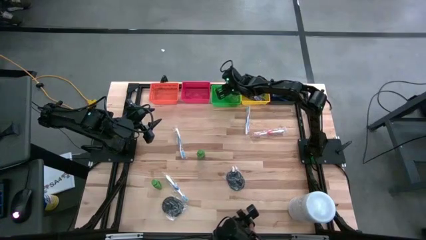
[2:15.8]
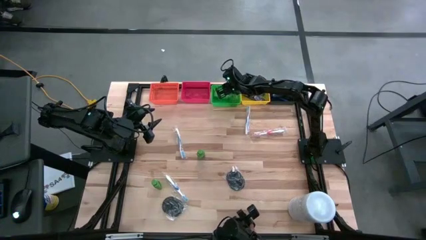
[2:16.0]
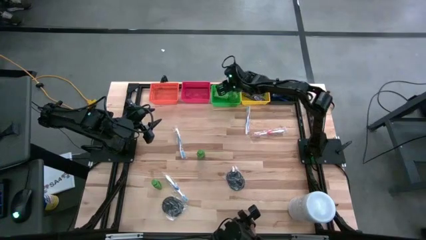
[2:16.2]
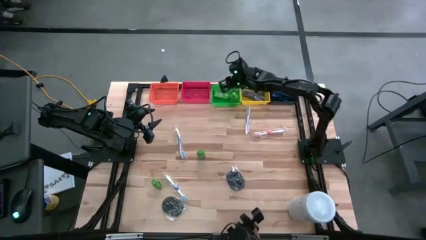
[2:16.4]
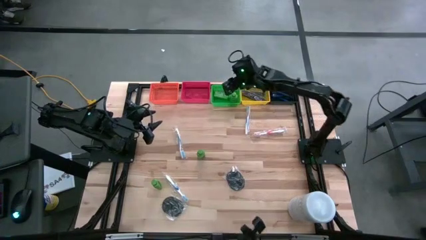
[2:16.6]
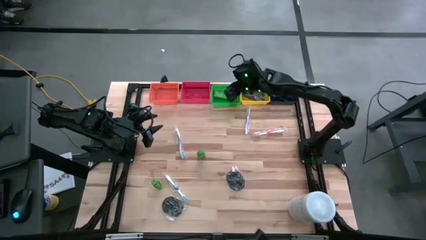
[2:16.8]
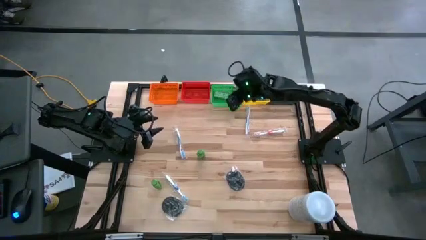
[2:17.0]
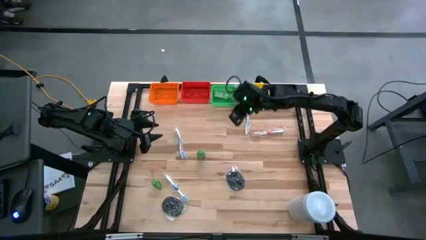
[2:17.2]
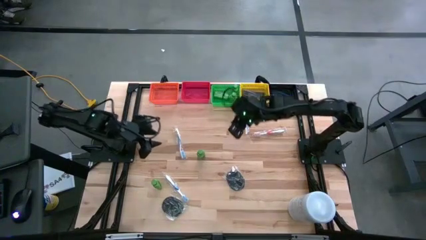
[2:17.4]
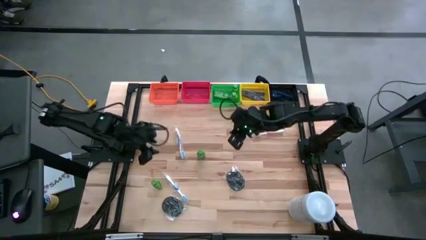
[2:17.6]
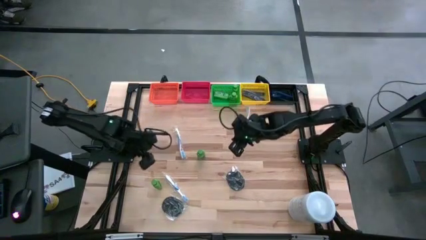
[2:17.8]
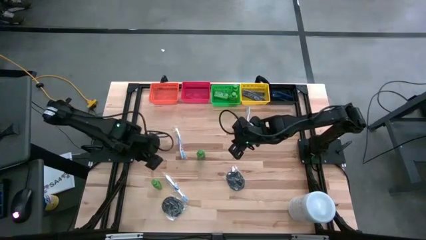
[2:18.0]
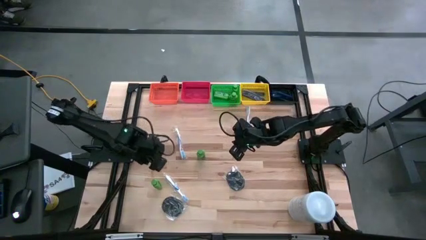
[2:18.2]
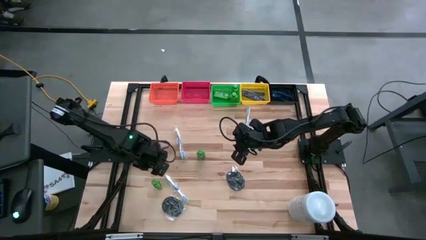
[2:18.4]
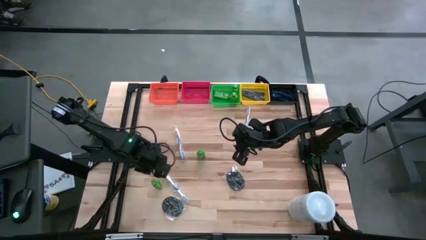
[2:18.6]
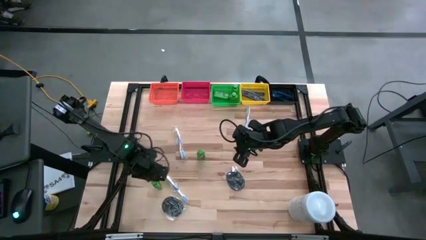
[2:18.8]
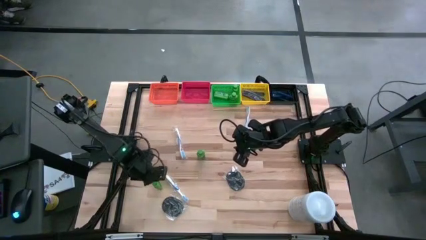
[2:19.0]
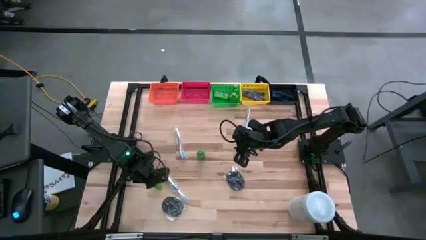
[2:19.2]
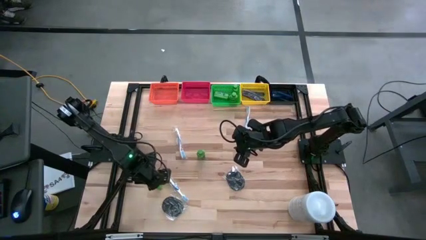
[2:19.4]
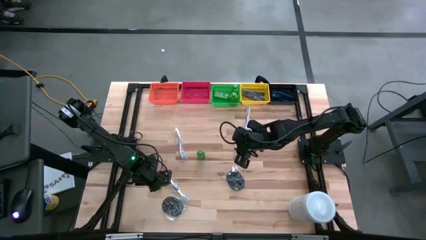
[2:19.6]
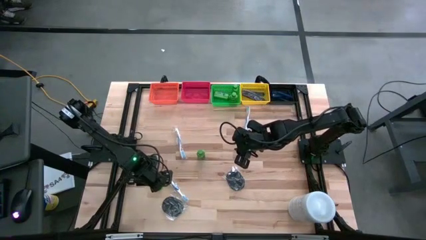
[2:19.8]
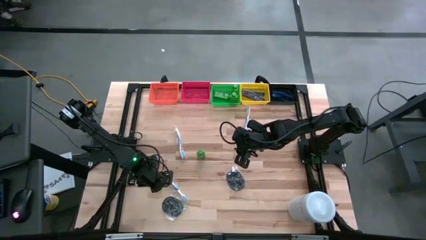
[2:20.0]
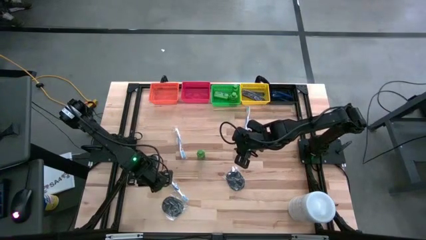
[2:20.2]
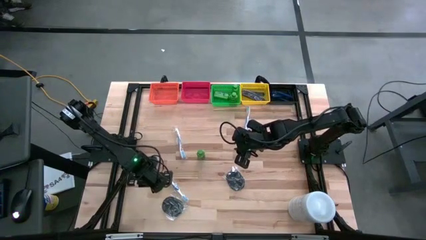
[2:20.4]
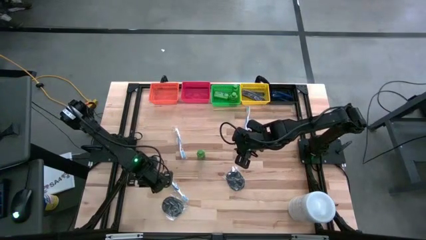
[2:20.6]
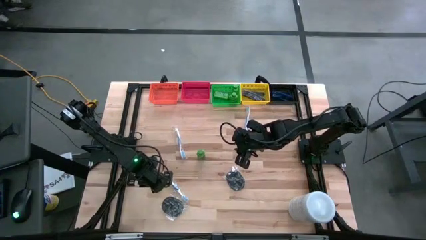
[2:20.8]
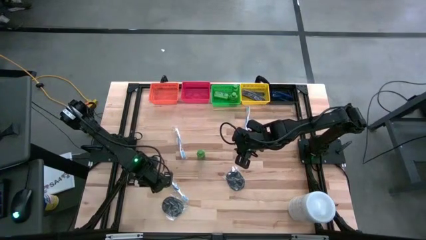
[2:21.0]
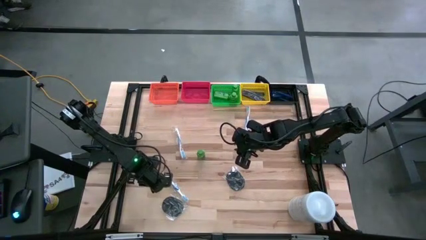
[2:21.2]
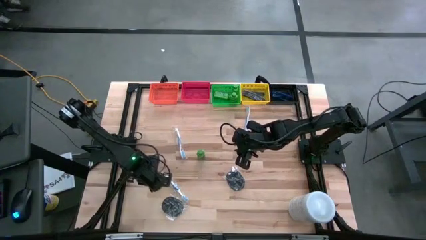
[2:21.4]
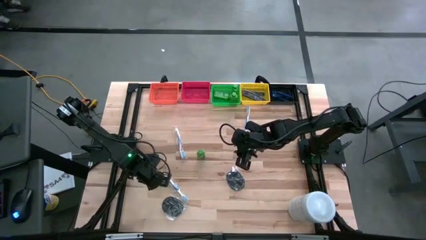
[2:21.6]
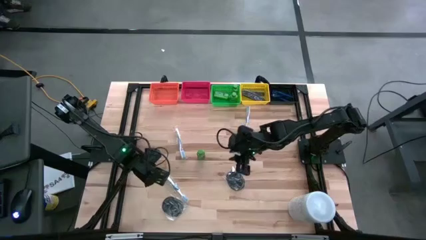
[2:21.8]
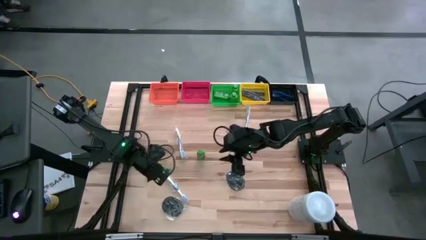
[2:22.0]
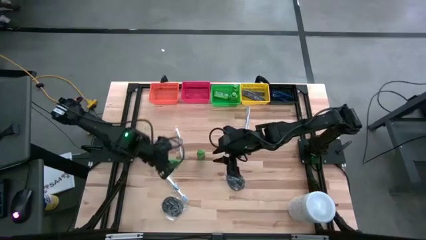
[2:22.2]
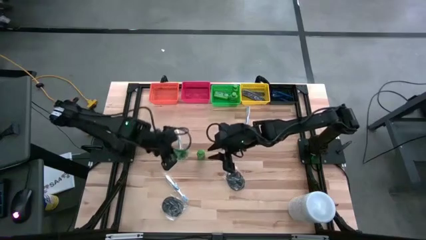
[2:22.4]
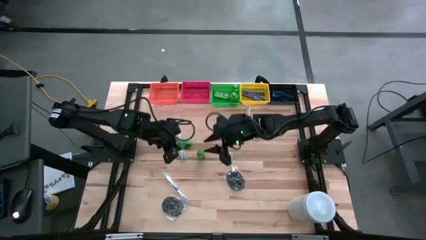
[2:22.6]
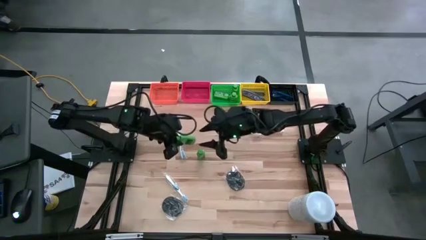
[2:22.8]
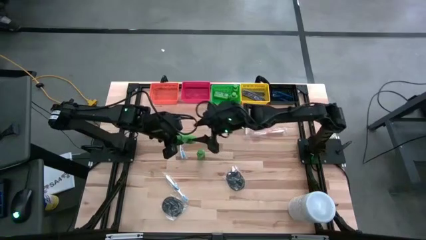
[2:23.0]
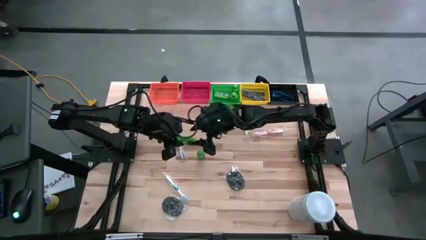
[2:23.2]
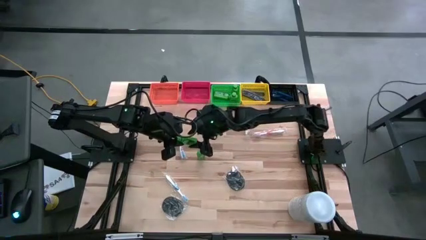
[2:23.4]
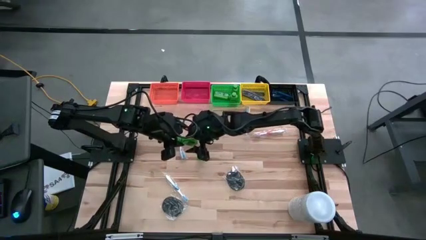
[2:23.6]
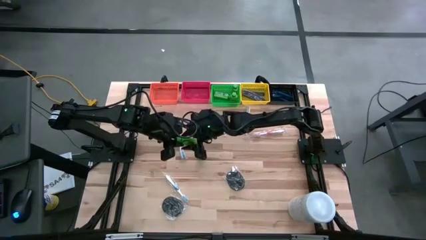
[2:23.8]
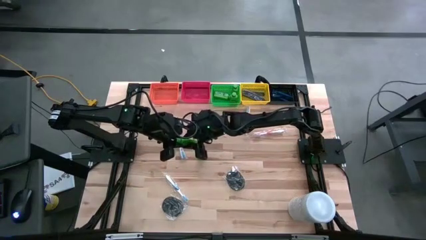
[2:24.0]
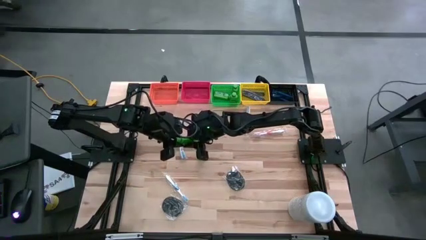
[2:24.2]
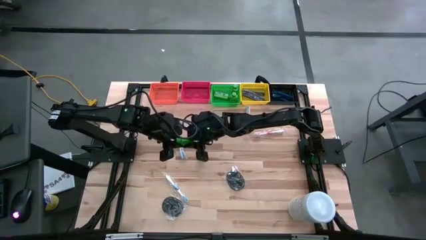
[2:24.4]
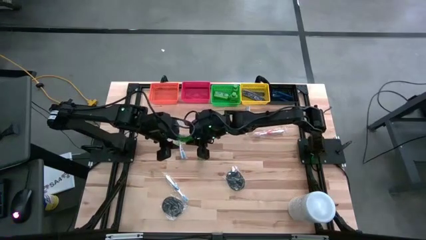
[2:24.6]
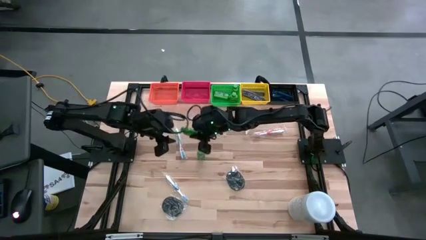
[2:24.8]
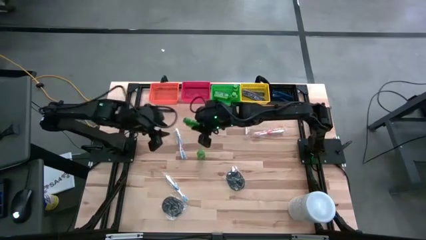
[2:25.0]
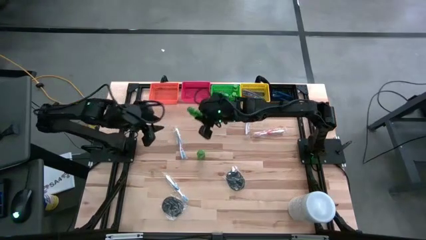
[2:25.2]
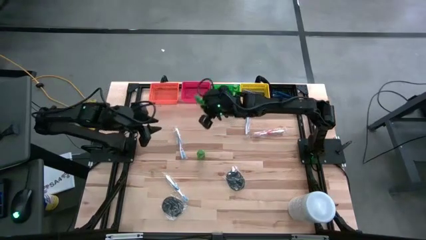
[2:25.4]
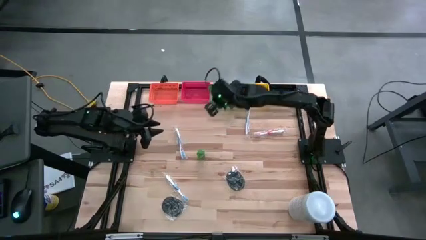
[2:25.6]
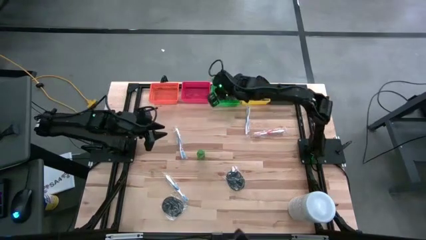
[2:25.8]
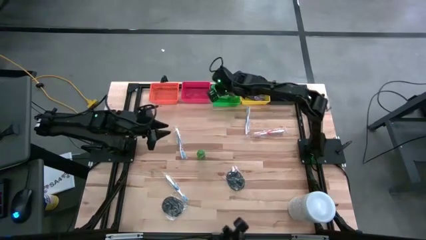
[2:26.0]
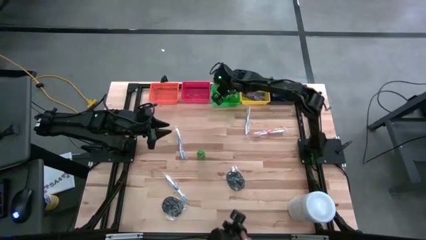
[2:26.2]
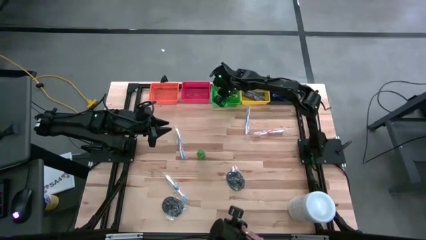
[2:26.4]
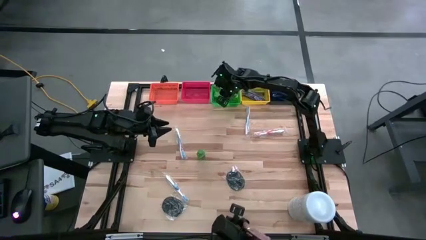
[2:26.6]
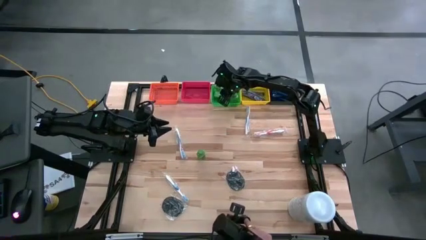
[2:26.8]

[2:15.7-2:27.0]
Task: Pick & Place Travel size toiletries
Put the green shampoo into the green bin

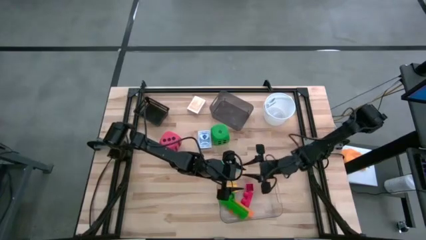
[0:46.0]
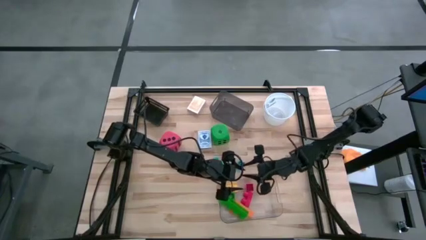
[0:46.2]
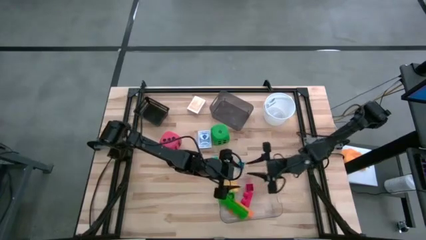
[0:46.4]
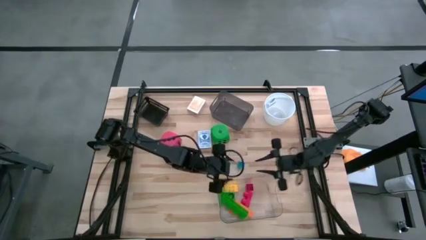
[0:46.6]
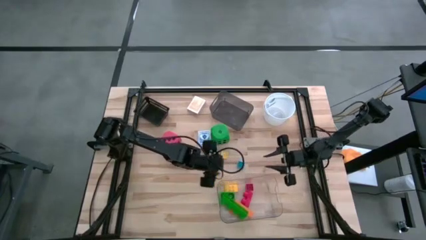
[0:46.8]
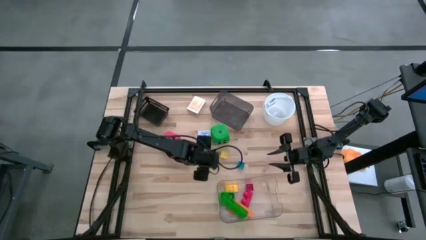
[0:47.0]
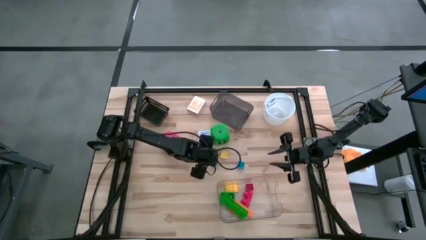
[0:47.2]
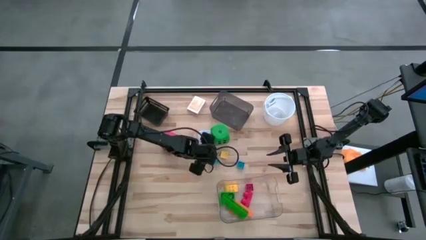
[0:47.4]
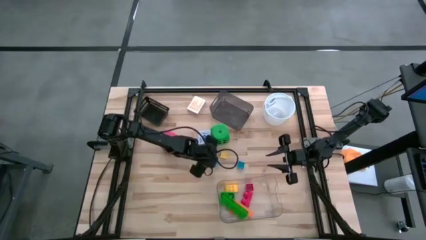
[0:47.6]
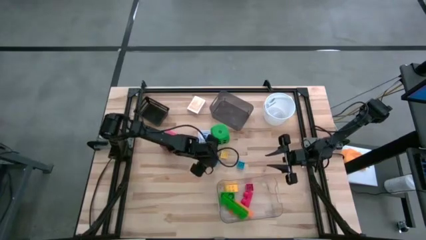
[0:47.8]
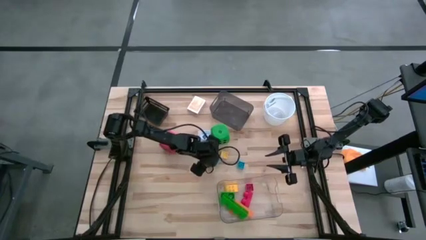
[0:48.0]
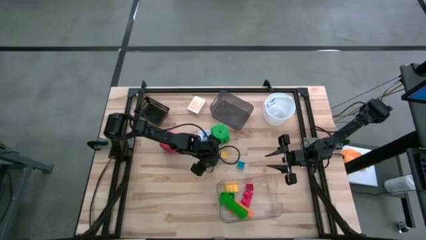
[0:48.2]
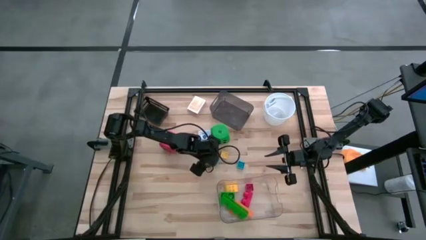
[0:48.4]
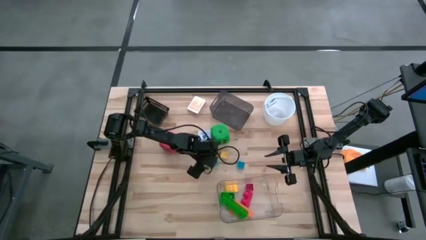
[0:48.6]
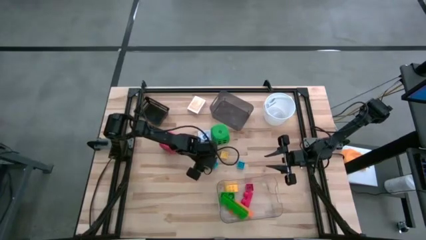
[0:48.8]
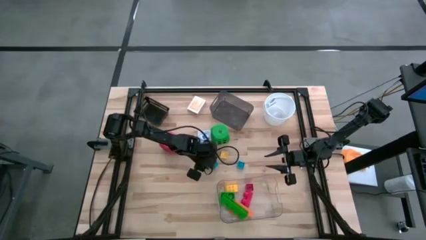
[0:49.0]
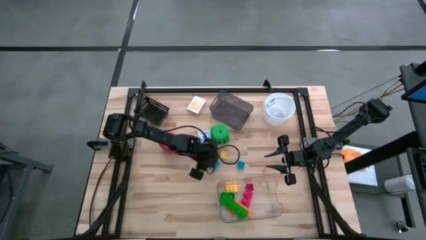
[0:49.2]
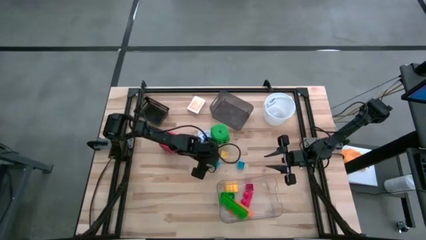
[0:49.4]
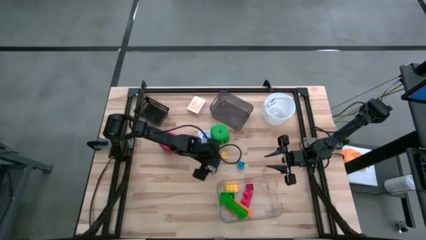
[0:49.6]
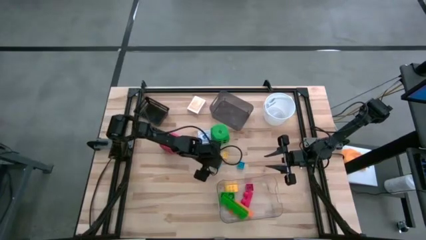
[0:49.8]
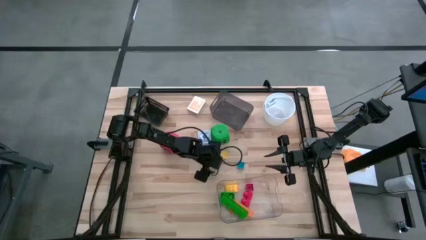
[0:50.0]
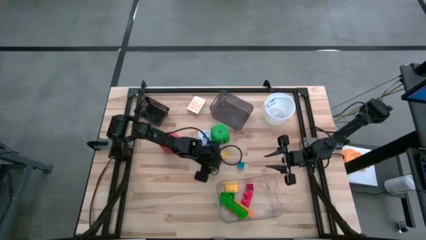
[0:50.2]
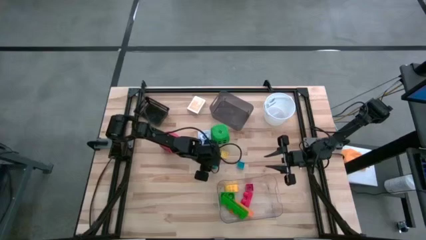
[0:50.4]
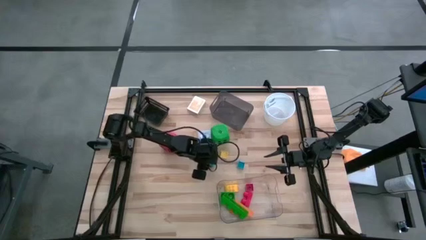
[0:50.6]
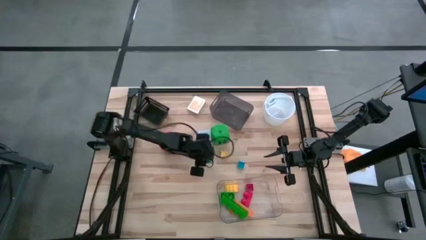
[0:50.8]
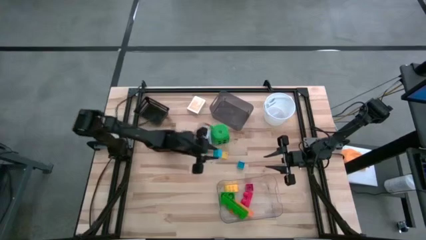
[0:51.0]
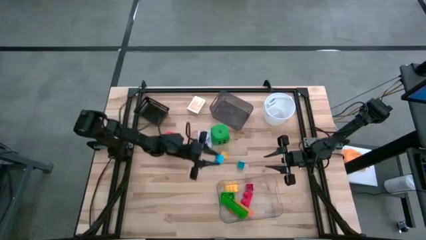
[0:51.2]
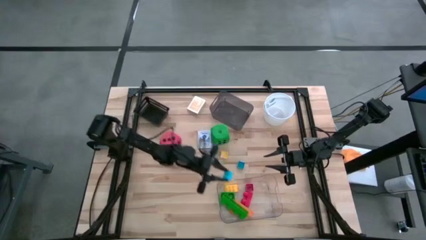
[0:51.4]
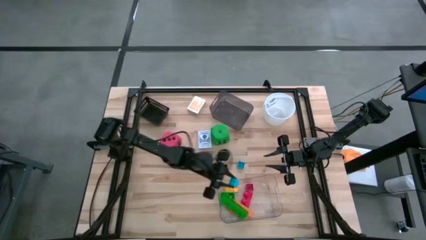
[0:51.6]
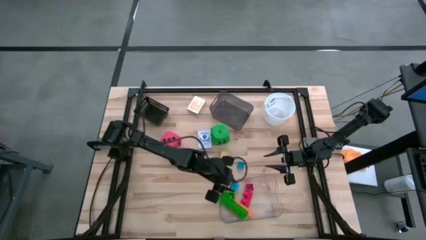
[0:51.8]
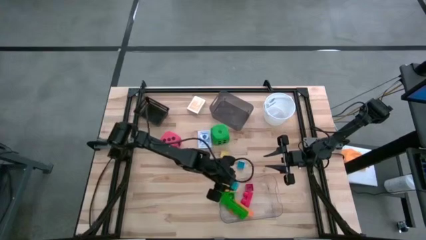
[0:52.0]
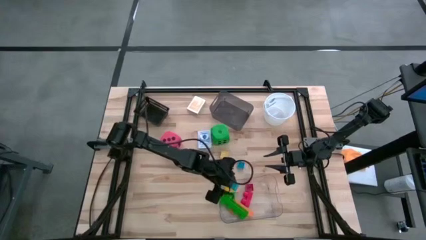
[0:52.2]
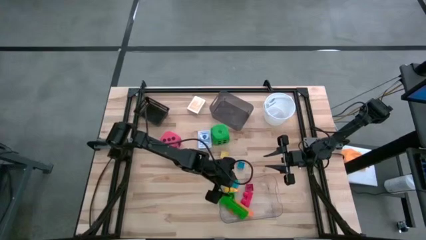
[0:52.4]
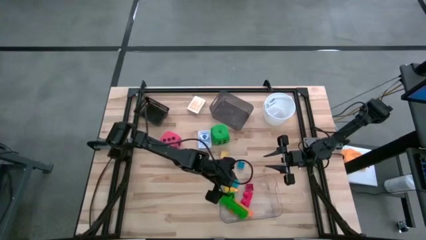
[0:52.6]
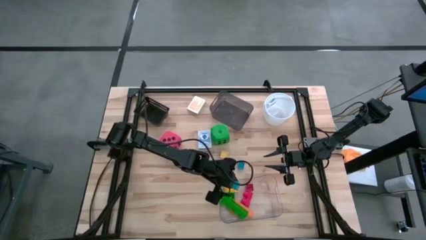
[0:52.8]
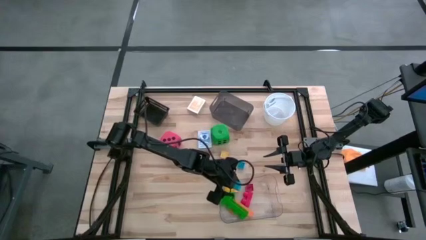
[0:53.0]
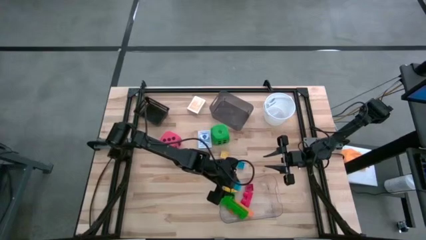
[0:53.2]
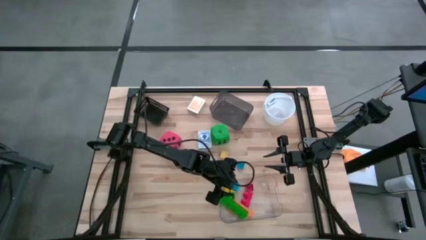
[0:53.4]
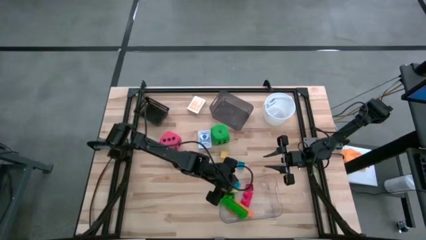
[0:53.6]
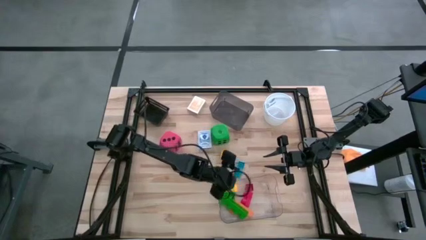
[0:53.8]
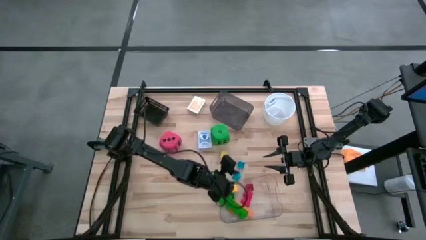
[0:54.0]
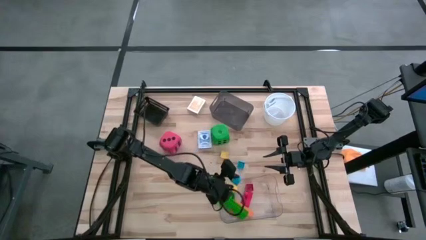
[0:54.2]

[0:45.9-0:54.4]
Task: Pick & Place Toys
Put the blue game piece into the bottom transparent bin
